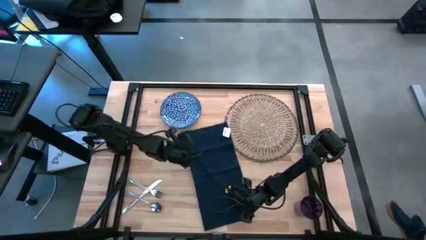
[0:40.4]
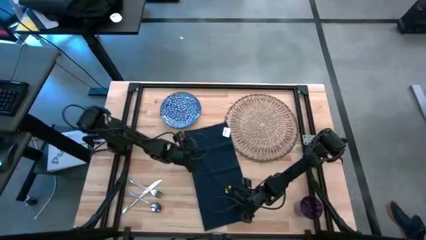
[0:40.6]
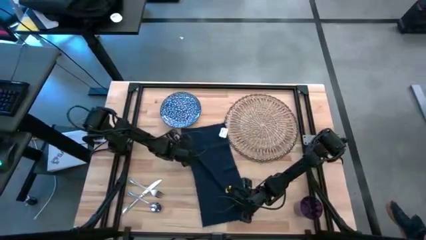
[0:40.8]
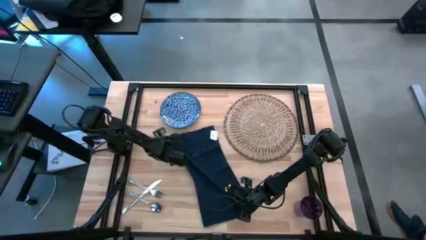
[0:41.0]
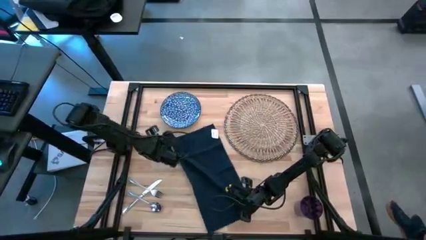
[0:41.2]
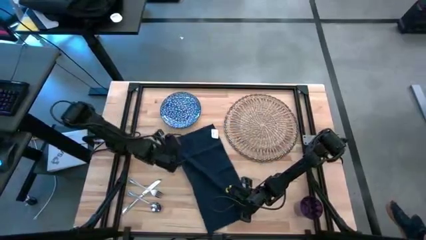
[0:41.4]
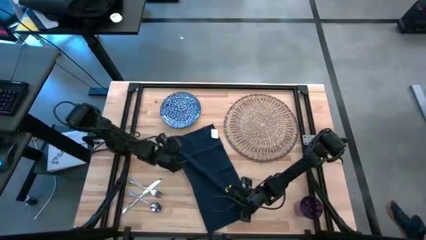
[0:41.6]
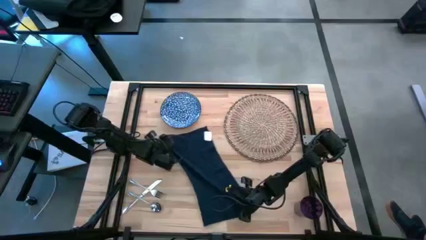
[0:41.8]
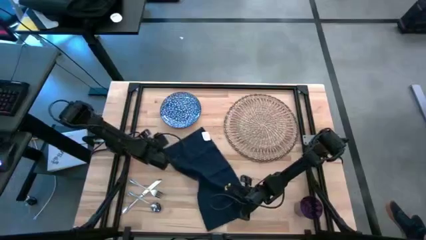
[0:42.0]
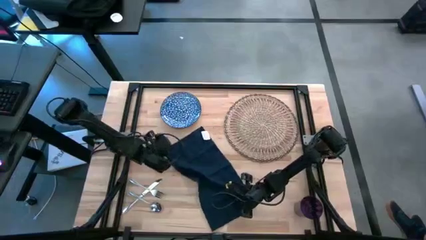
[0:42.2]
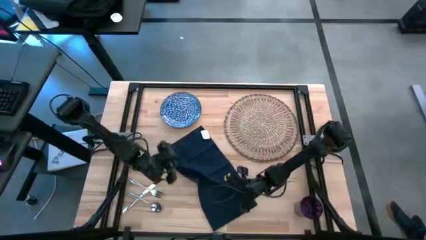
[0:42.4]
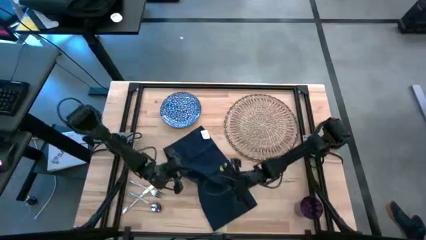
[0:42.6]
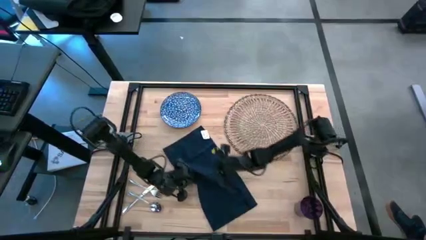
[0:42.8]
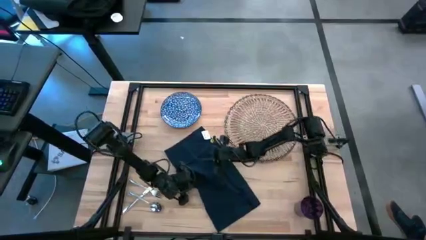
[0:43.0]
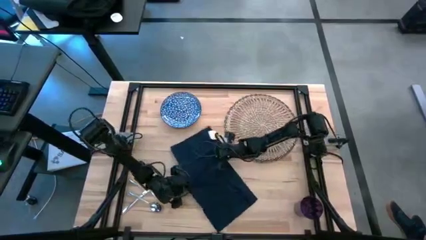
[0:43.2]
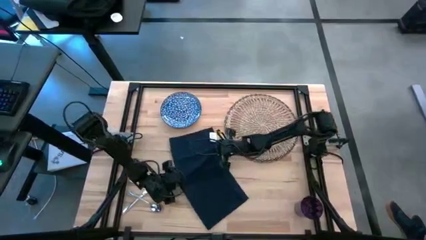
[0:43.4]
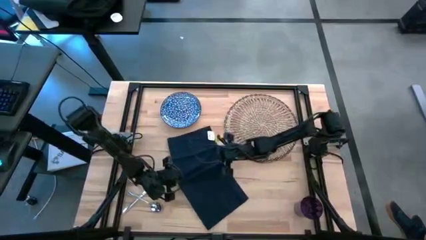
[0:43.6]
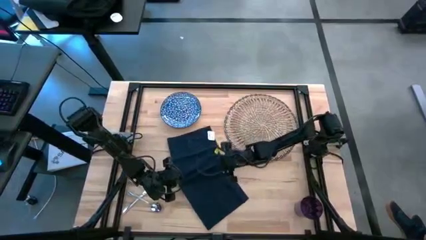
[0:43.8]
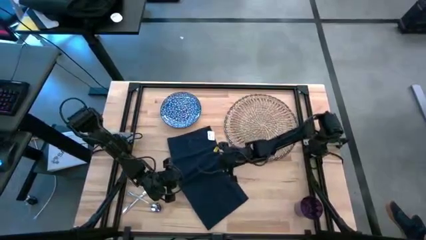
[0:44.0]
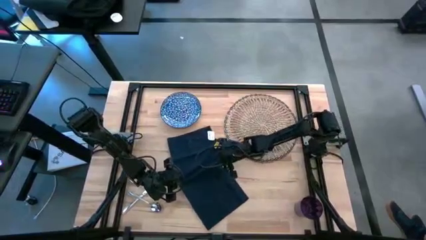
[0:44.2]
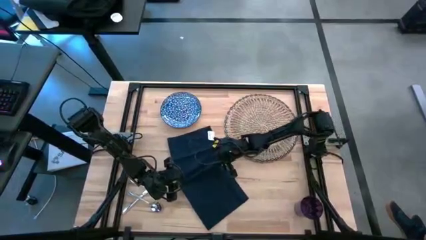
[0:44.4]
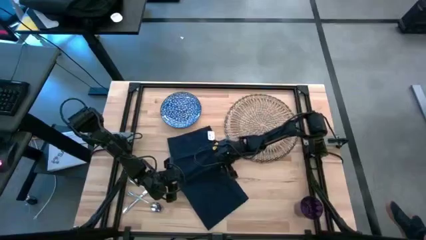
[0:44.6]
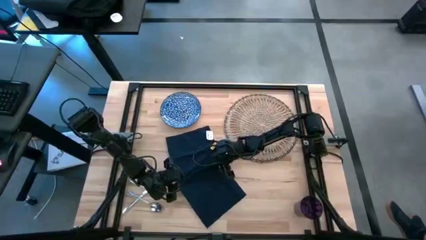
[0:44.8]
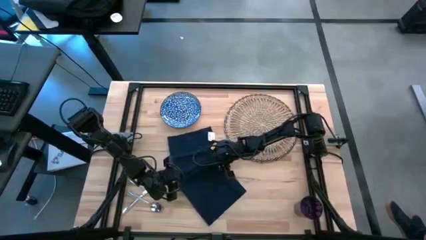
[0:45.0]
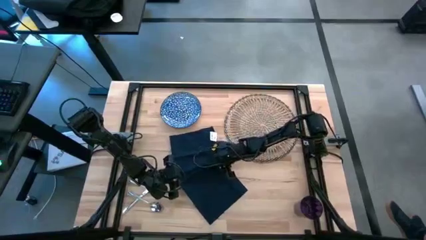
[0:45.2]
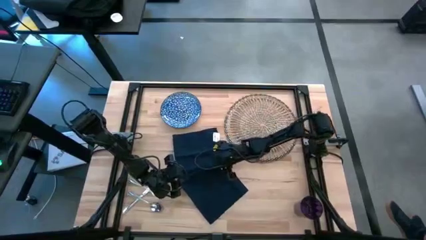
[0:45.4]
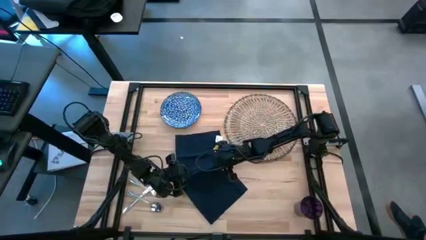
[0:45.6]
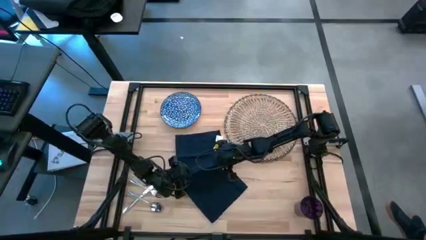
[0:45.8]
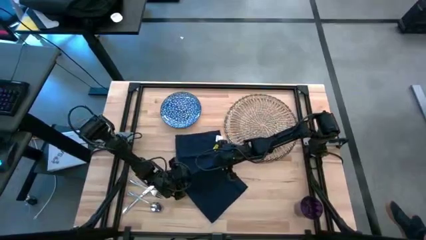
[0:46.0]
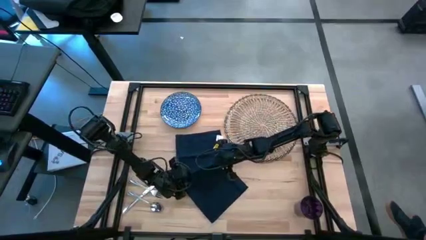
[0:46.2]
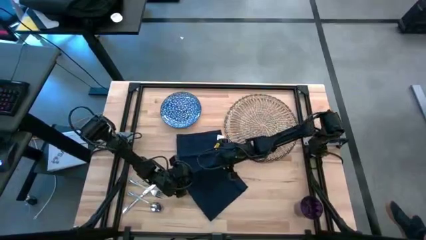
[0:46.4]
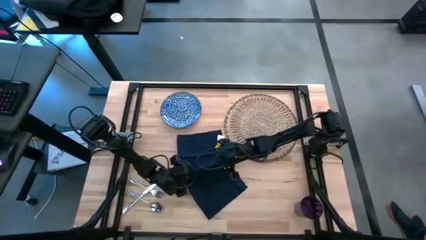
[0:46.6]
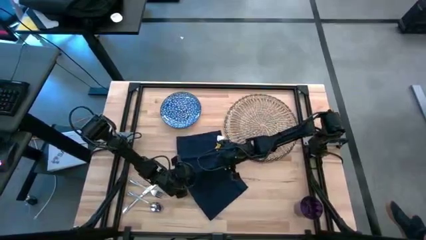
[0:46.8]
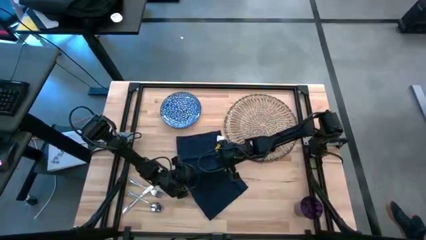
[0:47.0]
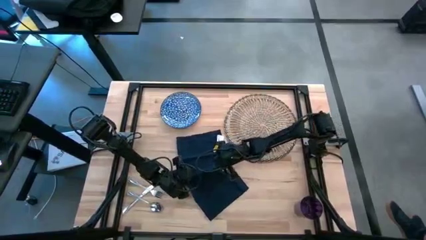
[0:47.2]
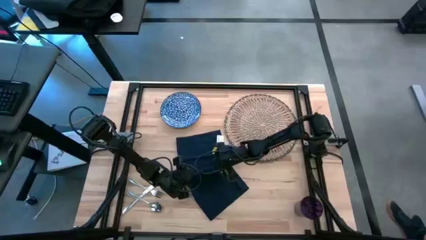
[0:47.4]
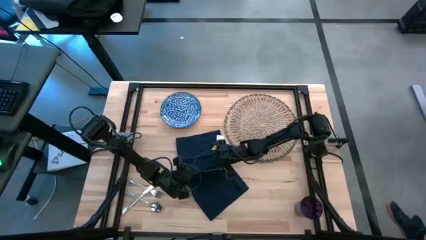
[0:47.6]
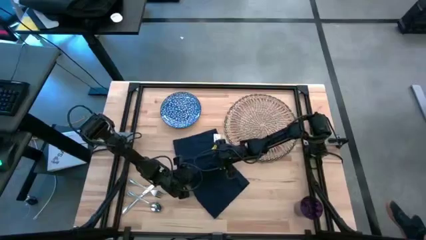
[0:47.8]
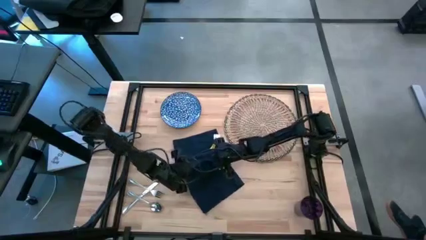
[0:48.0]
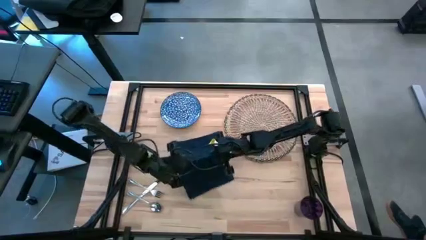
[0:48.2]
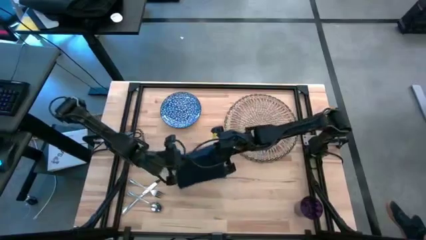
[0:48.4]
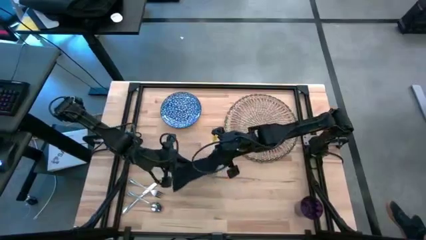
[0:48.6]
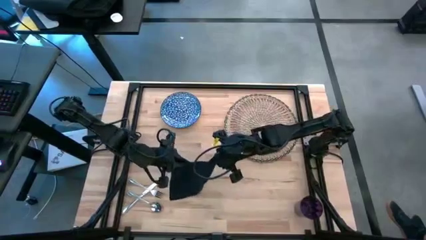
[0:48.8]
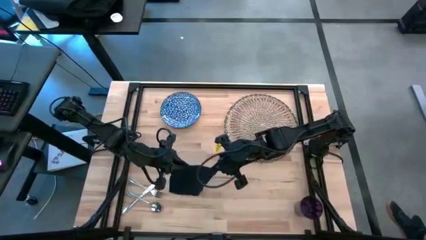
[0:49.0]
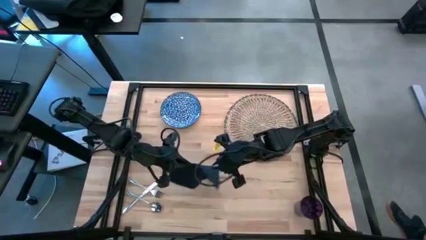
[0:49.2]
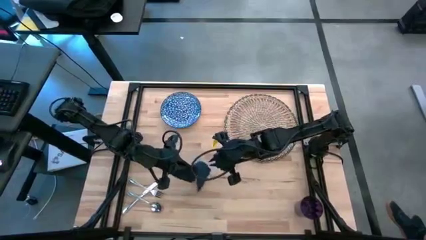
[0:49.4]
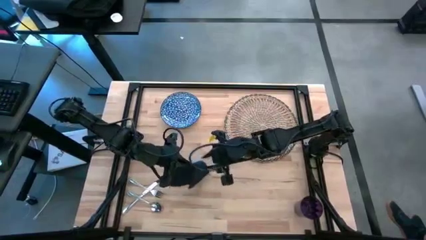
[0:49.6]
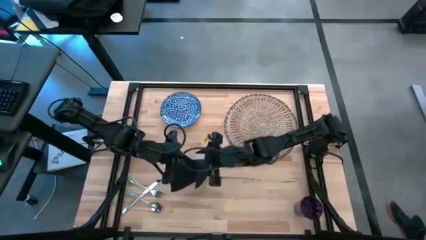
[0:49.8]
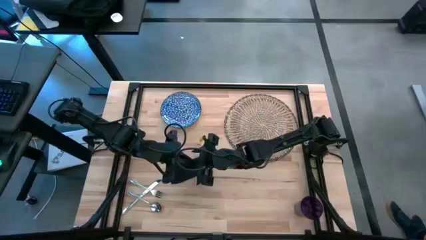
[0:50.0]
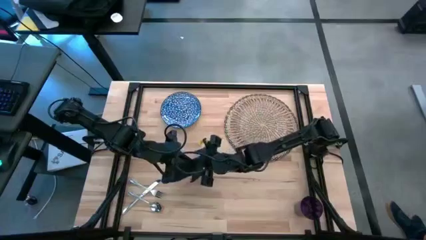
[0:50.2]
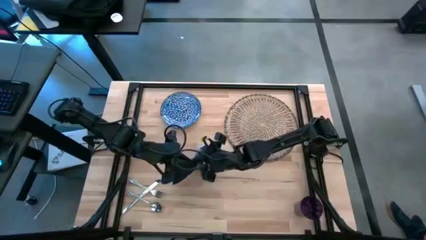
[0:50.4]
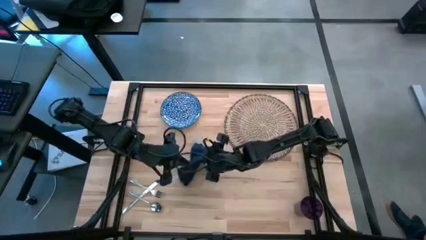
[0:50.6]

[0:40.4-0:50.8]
Task: Set table place
Fold the blue table napkin

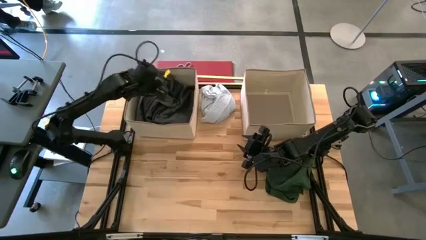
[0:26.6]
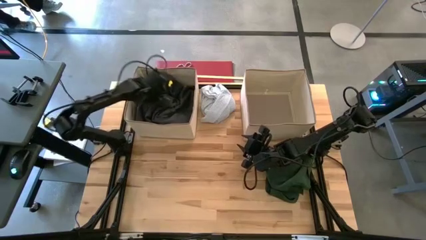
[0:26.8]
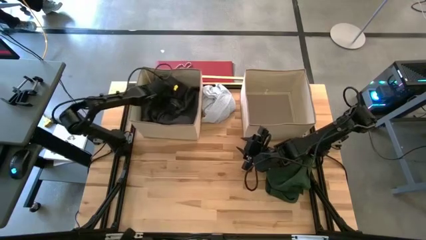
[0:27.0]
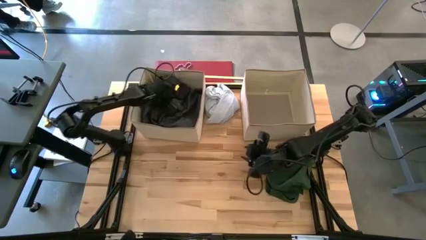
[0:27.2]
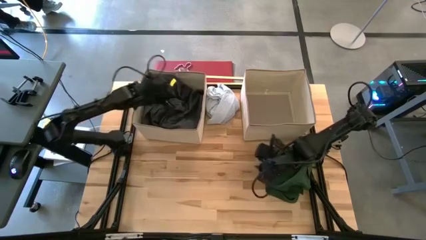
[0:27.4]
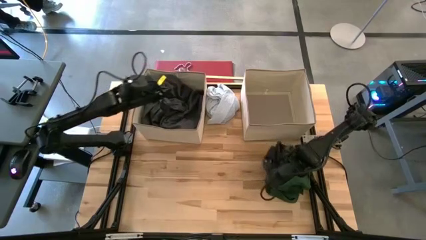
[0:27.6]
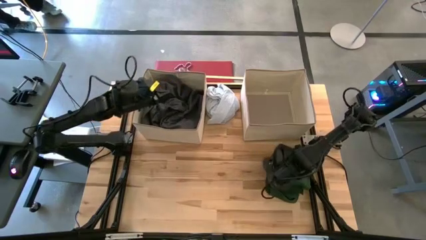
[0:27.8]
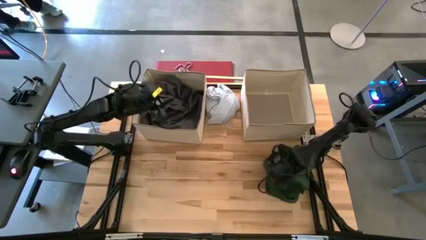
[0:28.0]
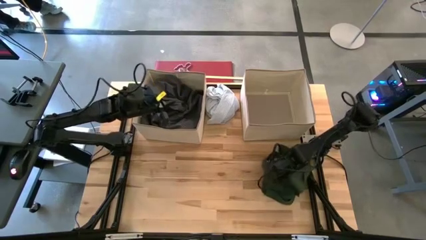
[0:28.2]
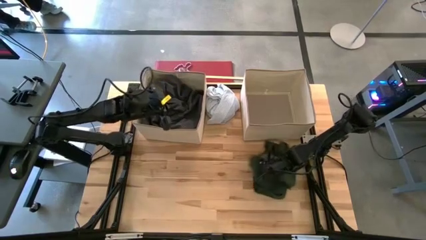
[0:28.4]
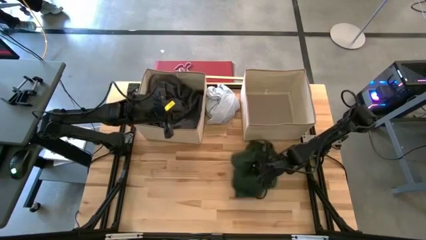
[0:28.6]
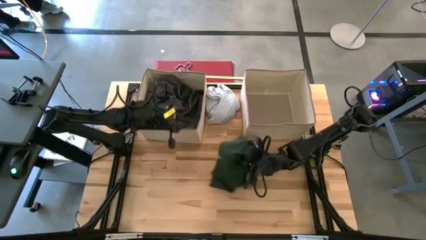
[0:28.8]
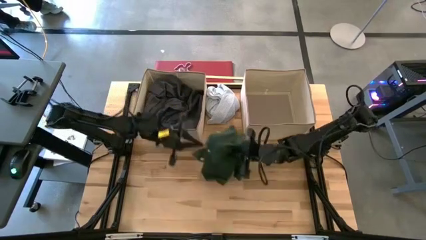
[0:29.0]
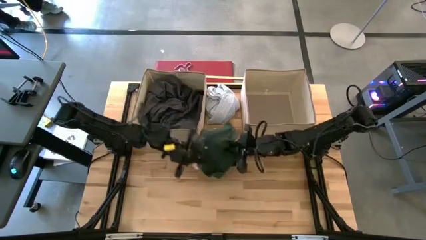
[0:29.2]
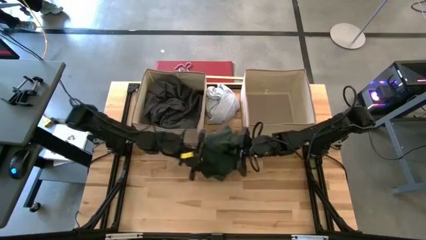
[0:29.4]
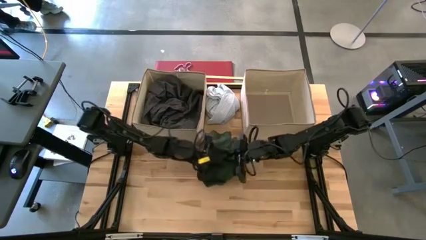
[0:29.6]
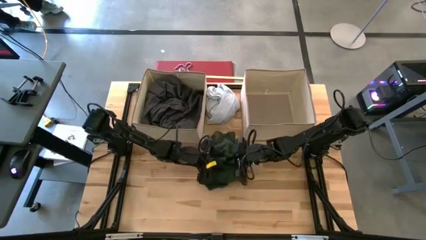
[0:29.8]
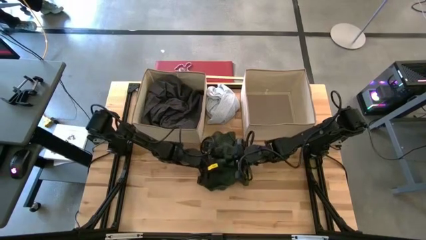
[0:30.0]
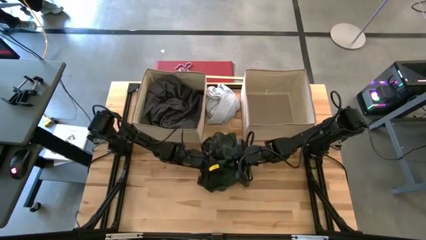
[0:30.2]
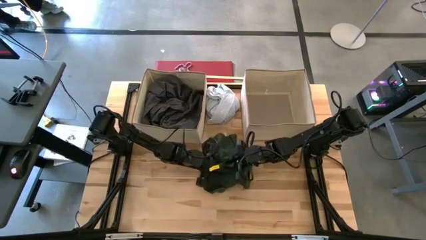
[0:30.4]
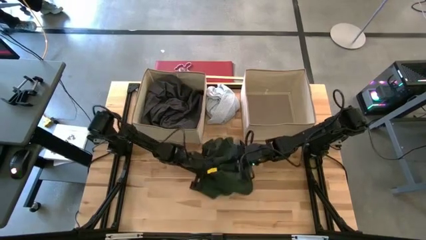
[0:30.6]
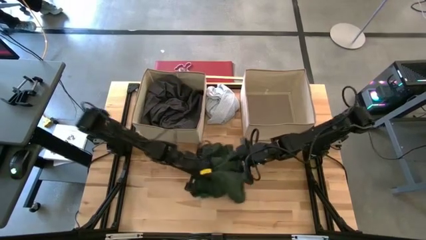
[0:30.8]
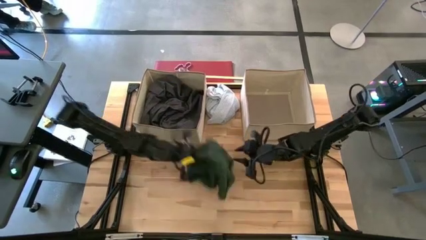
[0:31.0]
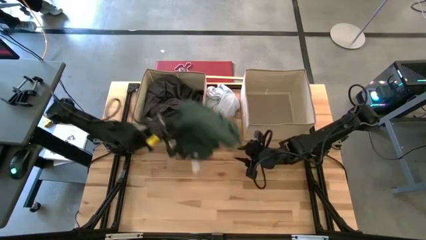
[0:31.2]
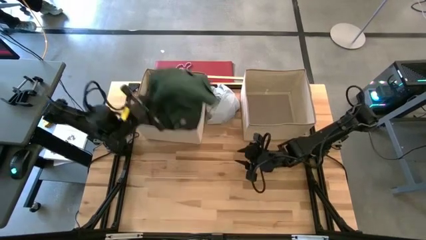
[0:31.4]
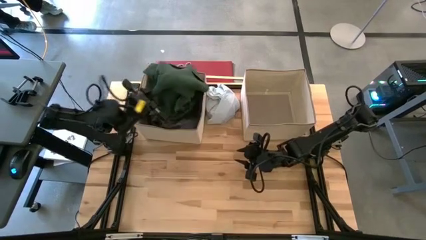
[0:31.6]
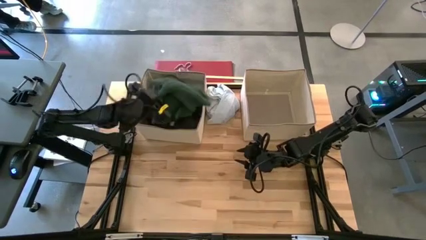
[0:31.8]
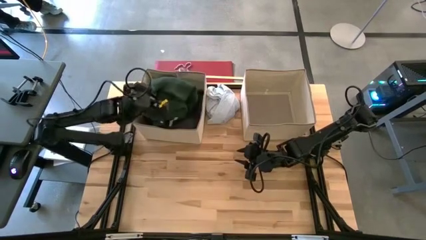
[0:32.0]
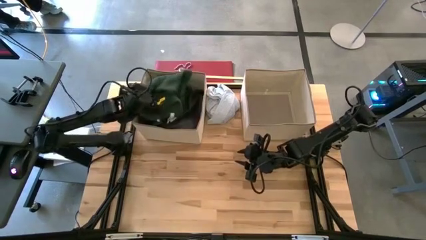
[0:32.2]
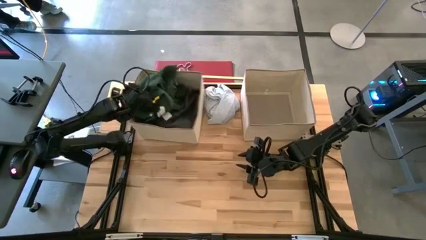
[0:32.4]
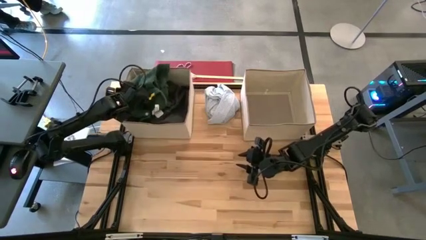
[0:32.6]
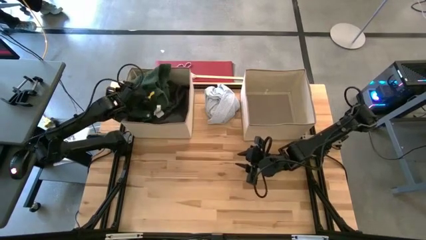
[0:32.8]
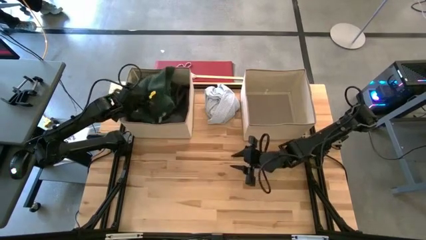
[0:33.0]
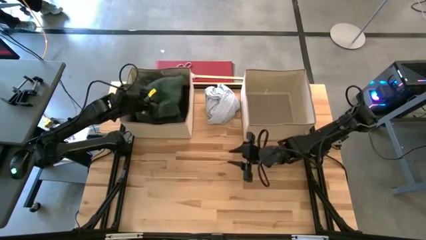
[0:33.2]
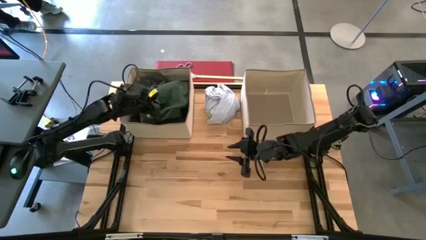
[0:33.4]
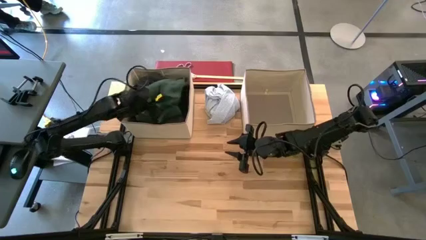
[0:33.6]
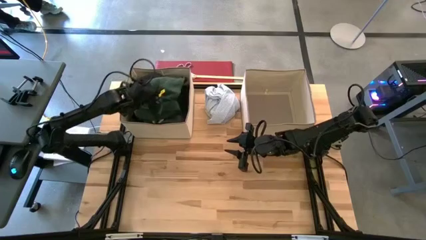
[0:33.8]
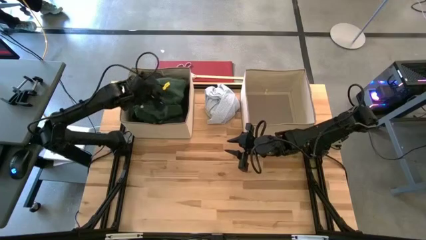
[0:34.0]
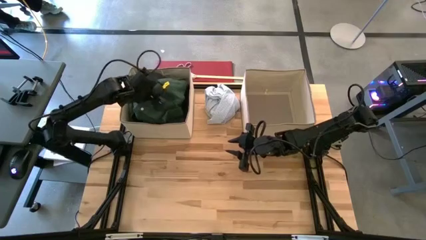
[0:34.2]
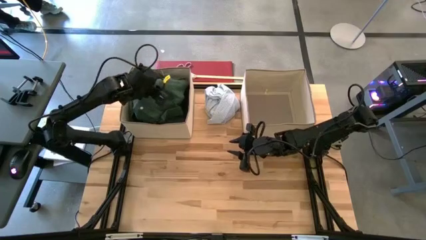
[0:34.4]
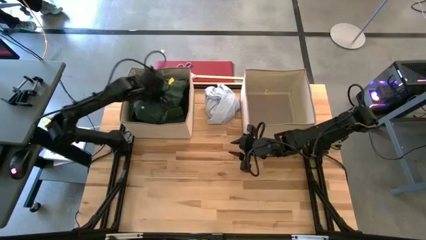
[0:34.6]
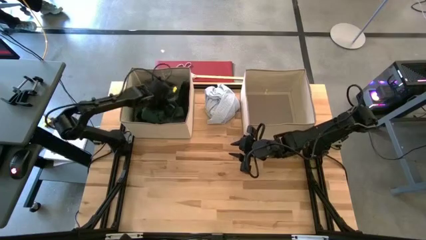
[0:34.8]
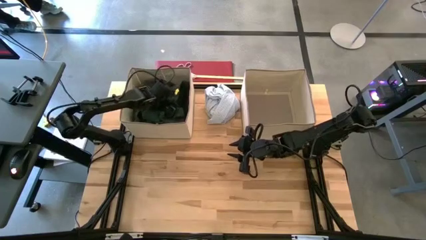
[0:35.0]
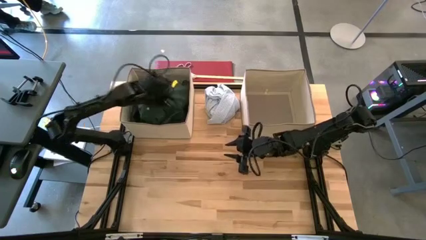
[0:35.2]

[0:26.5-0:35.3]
Task: Sort clothes
Put the green shirt into the left laundry organizer
